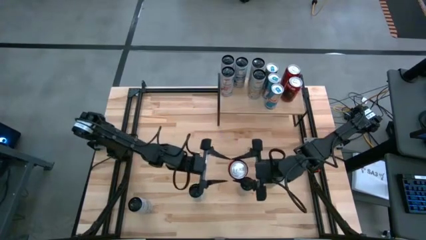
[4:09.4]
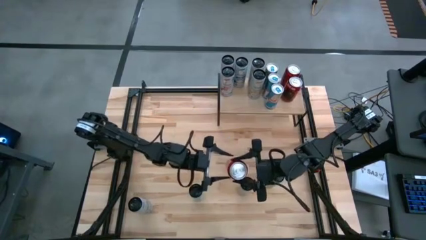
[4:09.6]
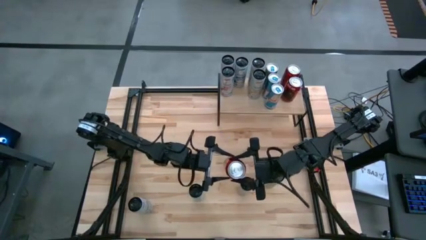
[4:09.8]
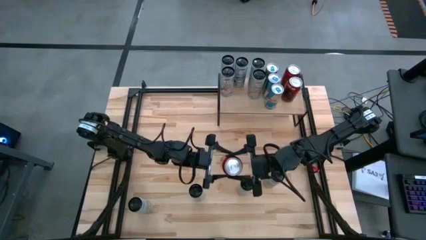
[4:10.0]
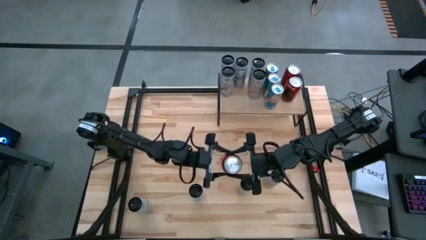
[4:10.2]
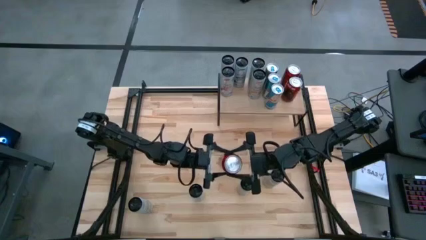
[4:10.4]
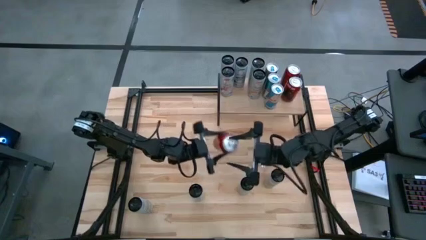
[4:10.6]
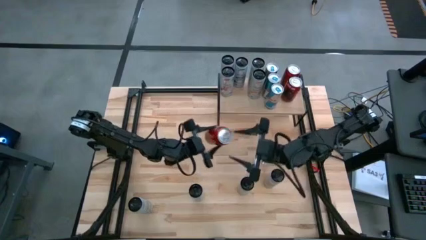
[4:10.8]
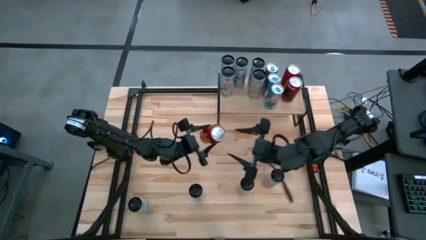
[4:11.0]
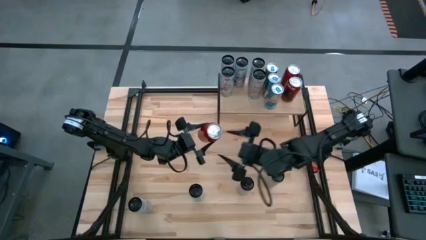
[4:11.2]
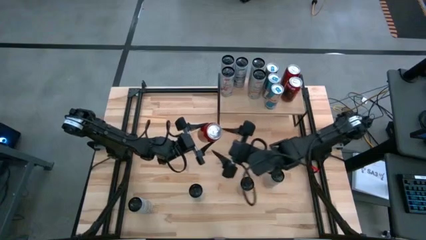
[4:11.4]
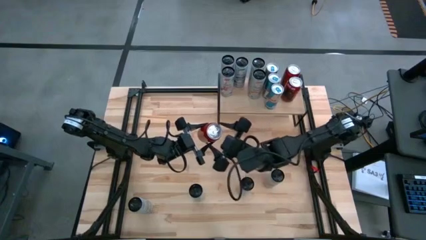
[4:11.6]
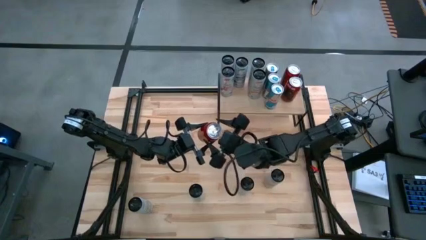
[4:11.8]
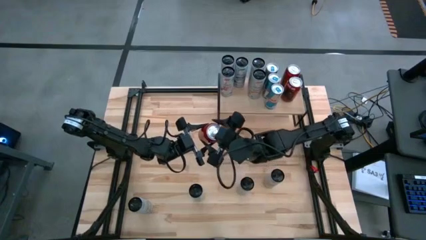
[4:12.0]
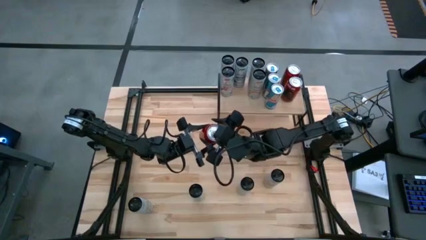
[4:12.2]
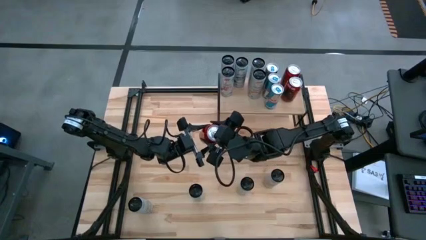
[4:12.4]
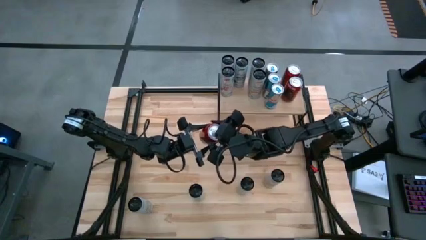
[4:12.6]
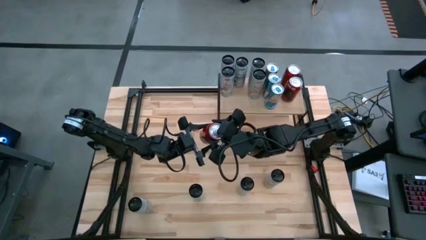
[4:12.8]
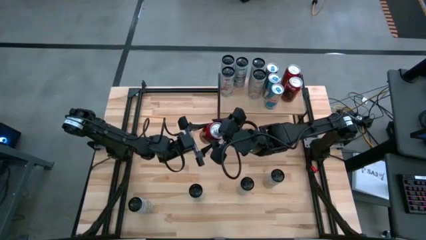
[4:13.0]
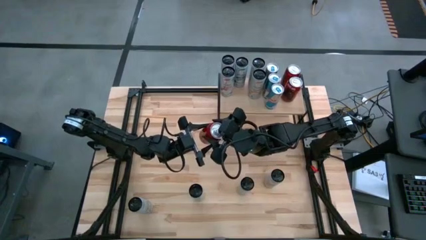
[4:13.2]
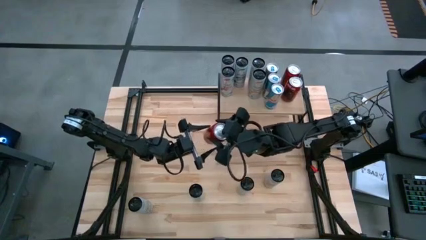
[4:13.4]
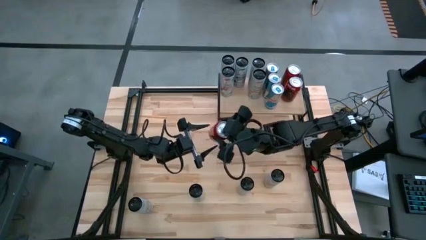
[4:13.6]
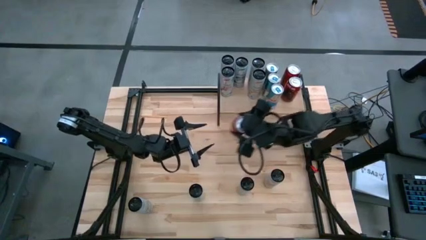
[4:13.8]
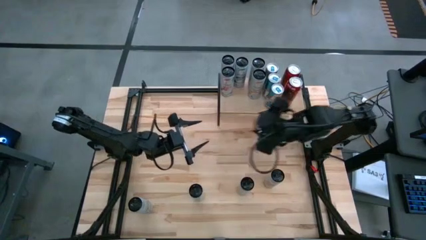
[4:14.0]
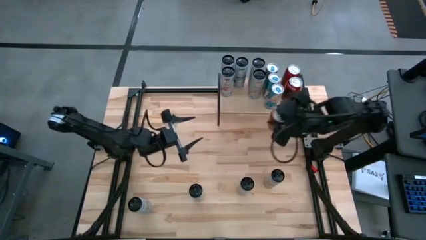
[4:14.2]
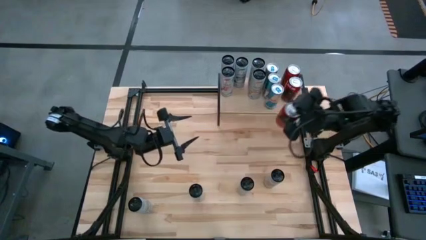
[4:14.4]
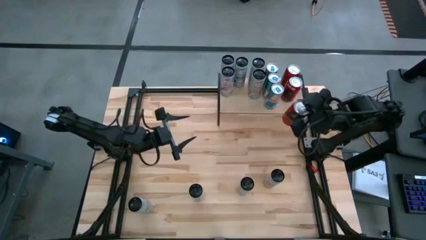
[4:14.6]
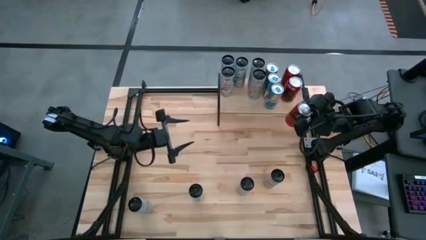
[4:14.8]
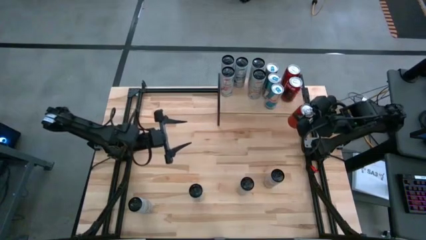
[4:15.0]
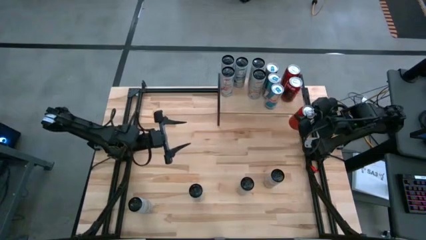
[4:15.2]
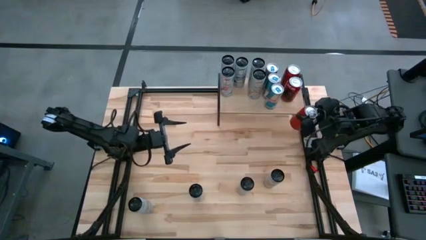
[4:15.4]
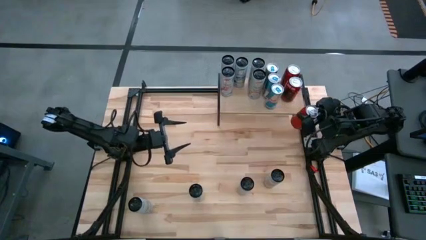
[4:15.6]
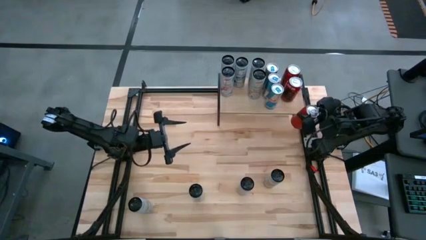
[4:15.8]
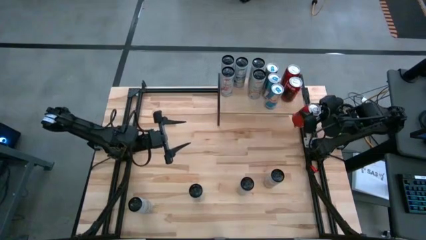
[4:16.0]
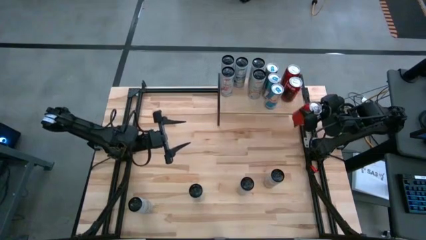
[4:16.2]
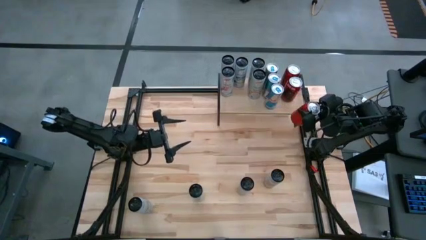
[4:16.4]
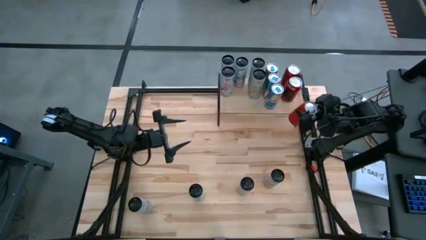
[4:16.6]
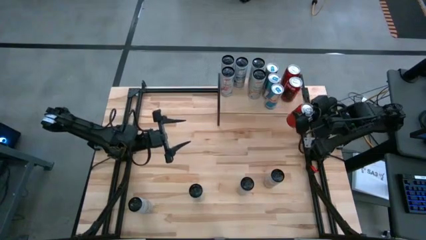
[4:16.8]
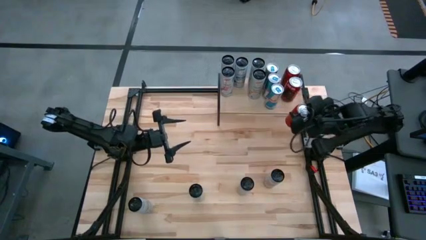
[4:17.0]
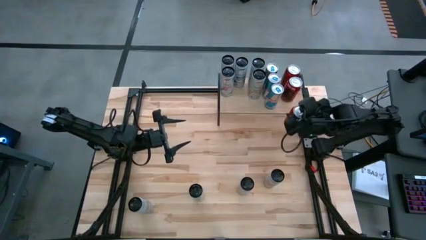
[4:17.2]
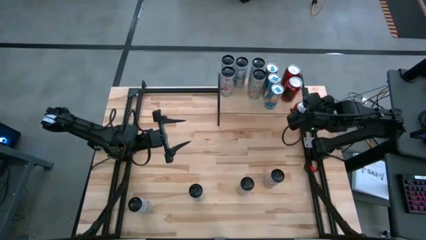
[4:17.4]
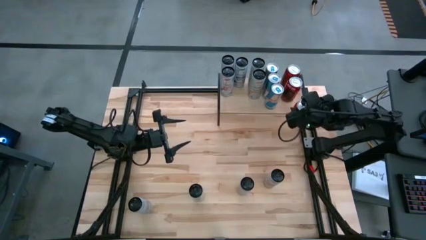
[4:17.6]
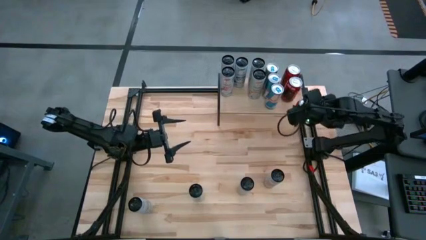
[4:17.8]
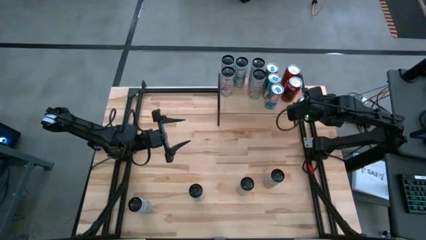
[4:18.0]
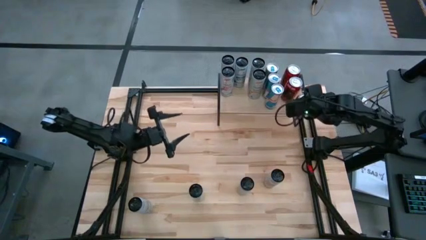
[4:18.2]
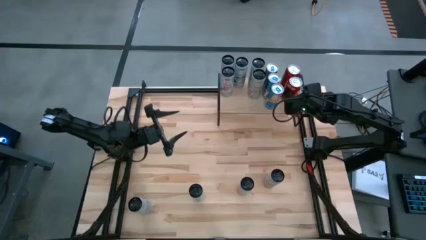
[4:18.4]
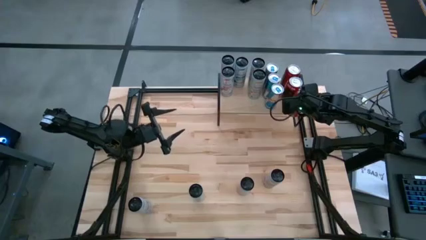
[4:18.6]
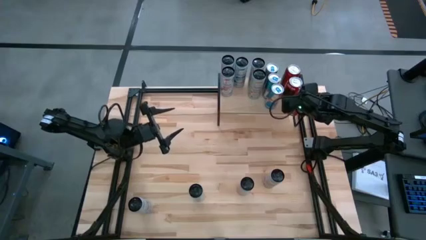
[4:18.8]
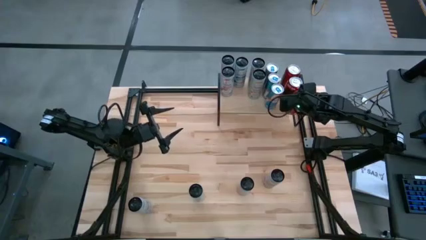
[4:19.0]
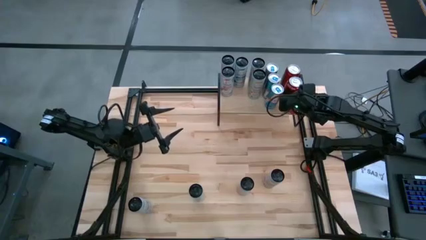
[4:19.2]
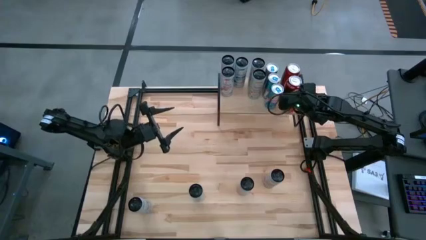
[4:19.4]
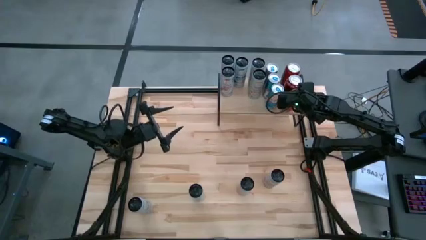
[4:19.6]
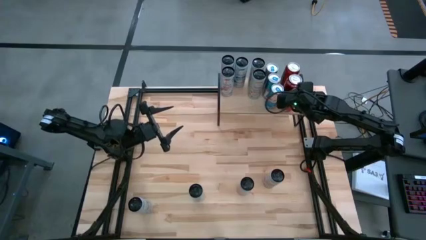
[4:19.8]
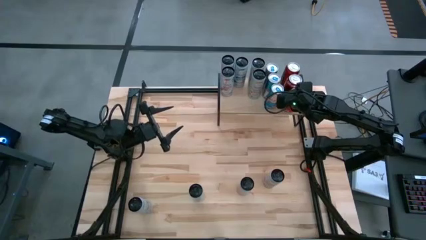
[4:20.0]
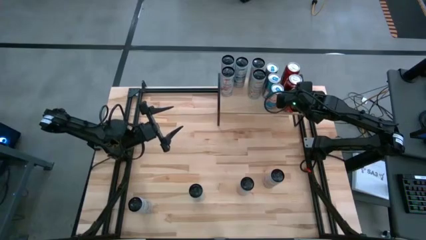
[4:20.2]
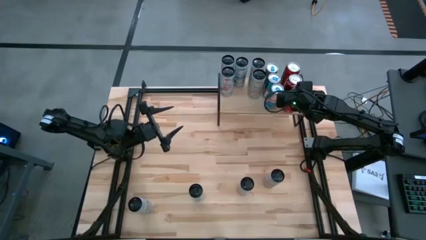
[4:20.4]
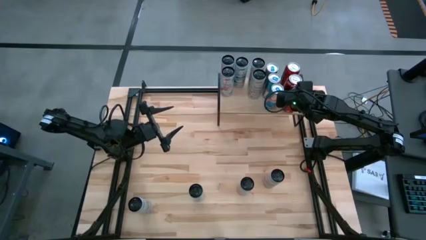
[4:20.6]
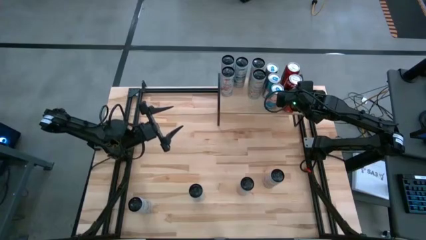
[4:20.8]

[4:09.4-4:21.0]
Task: Place canned beverage on shelf
Put the red black soda can on the shelf aligned with the red white soda cans

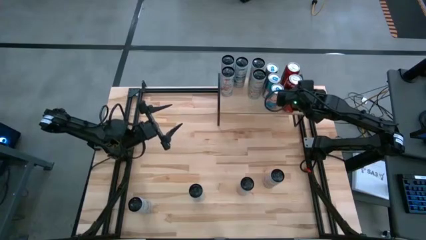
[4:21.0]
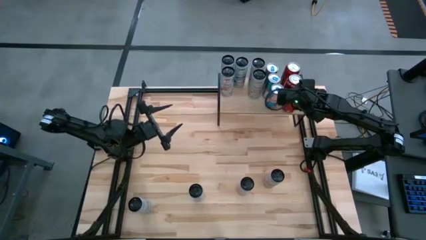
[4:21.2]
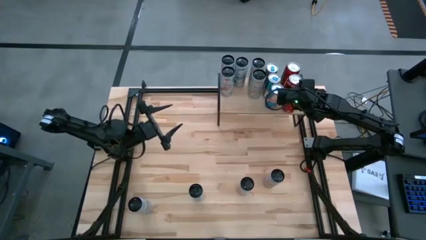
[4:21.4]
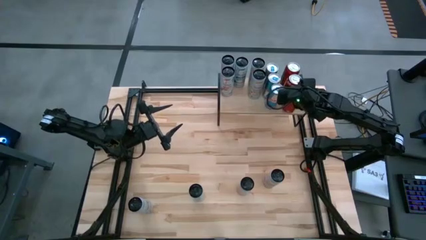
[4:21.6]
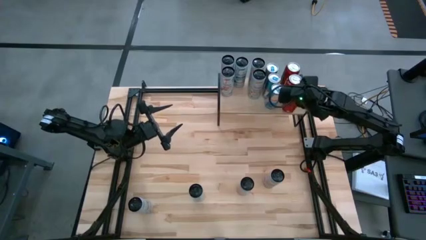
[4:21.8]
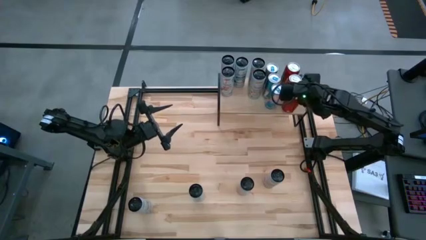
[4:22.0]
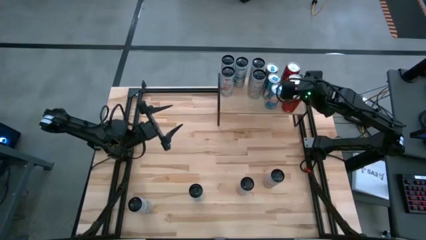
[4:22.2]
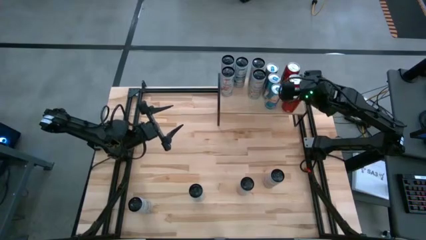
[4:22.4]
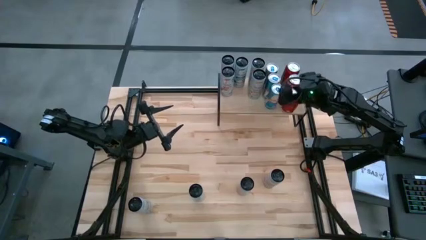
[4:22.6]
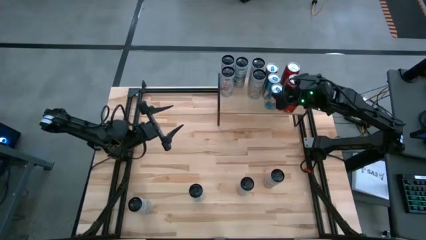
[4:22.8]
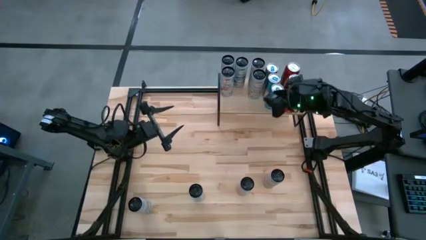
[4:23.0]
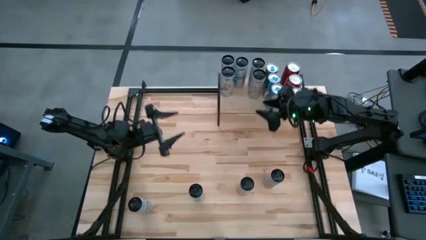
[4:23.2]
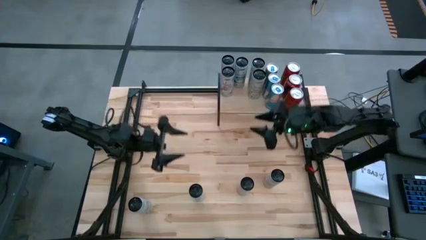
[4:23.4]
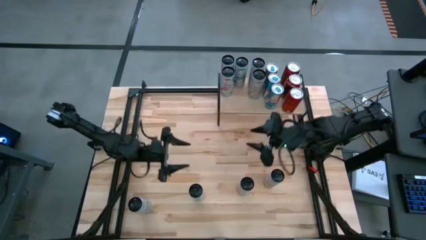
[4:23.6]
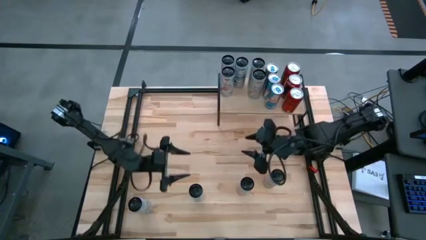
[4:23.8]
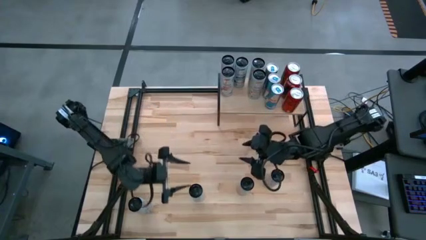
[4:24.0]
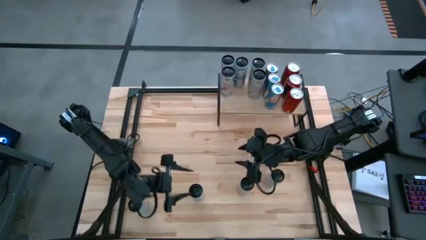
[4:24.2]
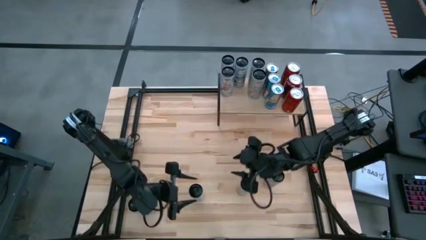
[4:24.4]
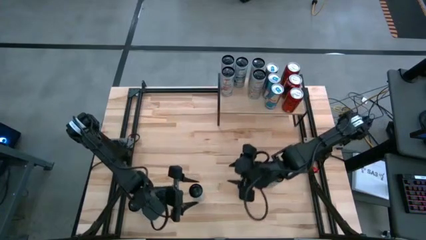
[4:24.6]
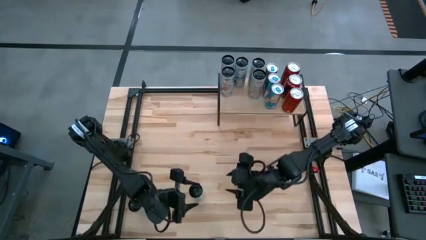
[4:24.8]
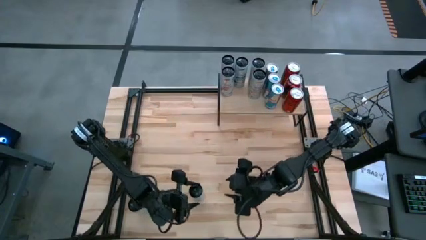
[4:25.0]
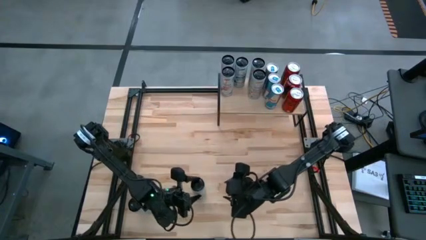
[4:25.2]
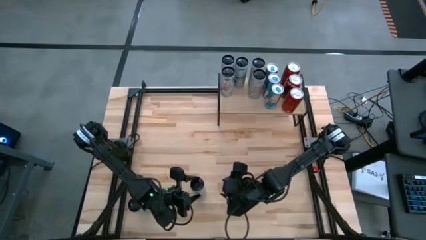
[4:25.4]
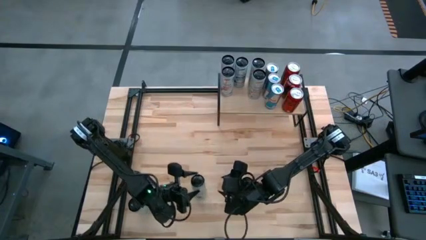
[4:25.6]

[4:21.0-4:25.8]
Put the right white blue soda can on the shelf aligned with the other white blue soda cans
